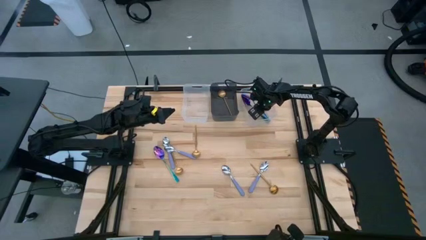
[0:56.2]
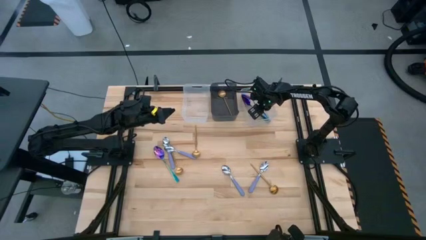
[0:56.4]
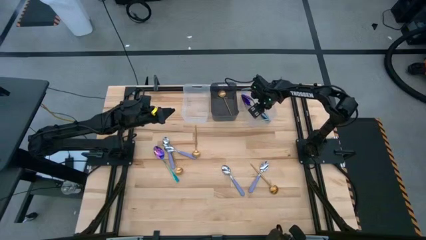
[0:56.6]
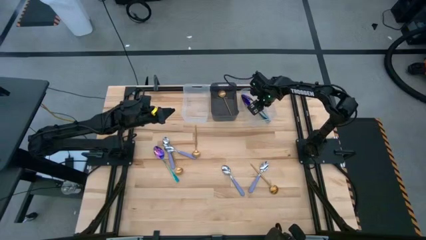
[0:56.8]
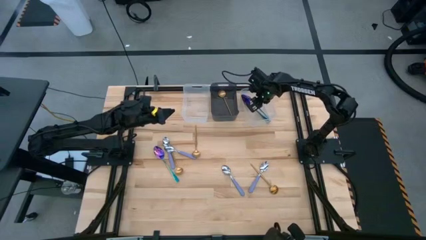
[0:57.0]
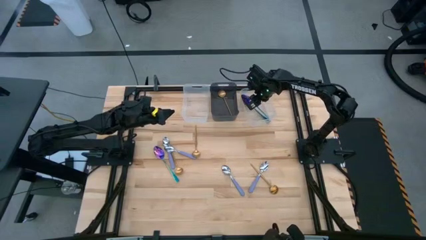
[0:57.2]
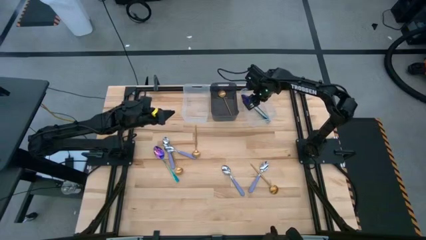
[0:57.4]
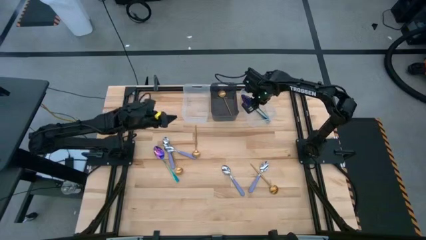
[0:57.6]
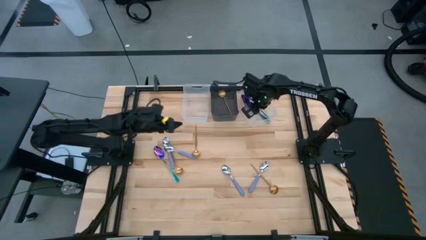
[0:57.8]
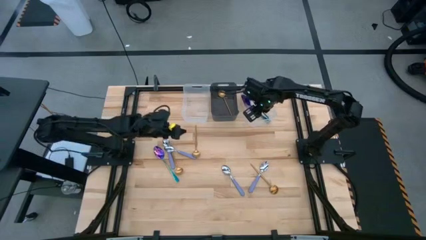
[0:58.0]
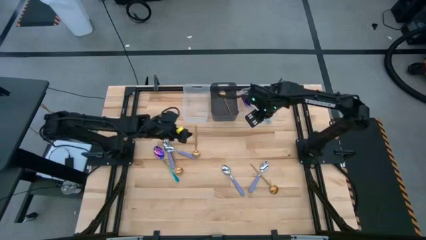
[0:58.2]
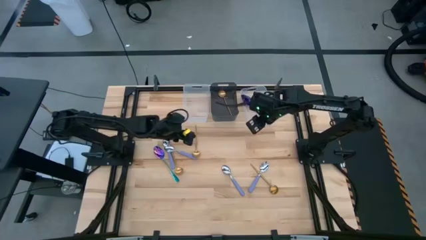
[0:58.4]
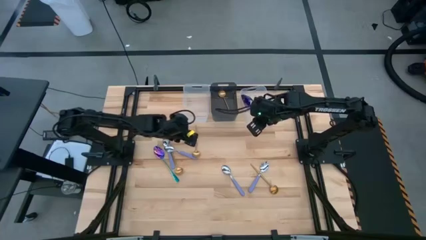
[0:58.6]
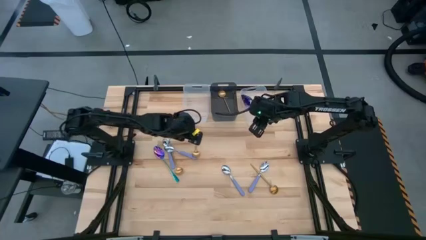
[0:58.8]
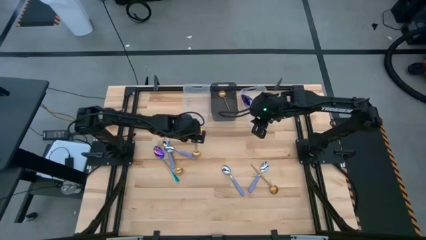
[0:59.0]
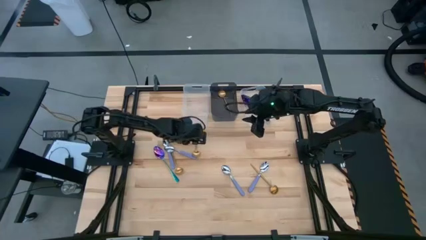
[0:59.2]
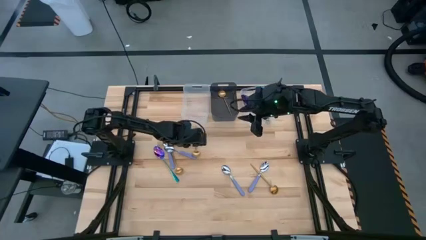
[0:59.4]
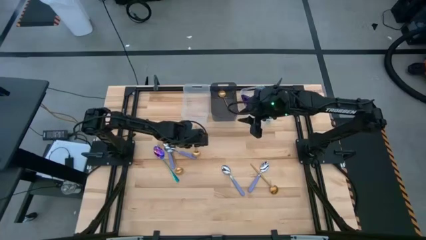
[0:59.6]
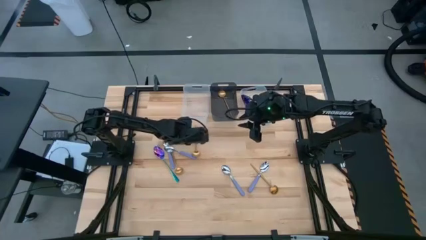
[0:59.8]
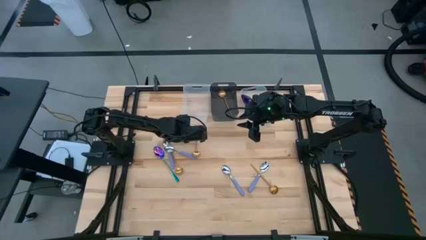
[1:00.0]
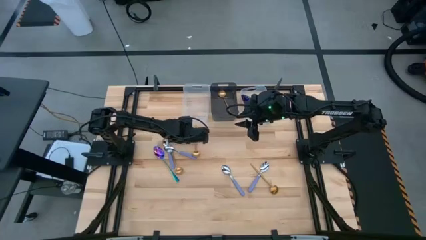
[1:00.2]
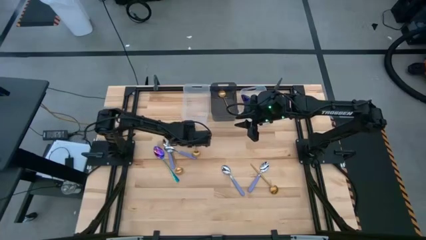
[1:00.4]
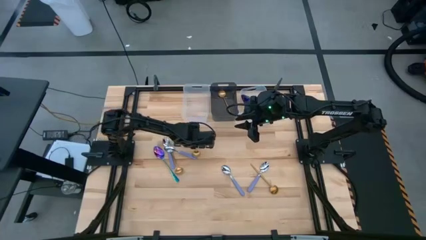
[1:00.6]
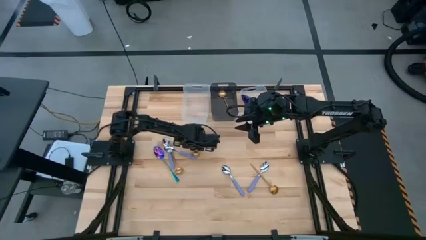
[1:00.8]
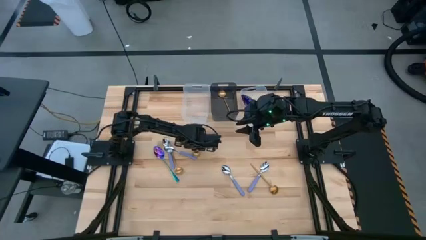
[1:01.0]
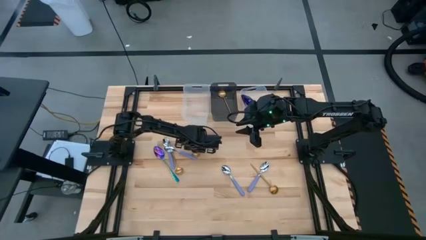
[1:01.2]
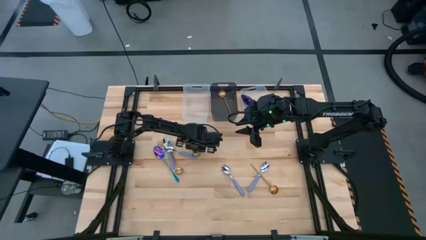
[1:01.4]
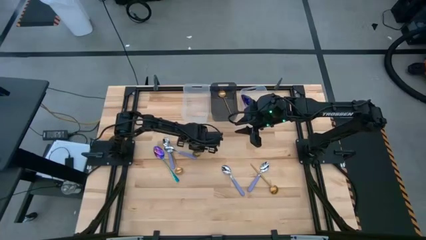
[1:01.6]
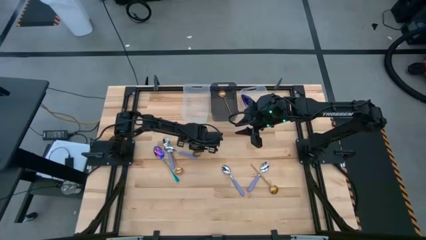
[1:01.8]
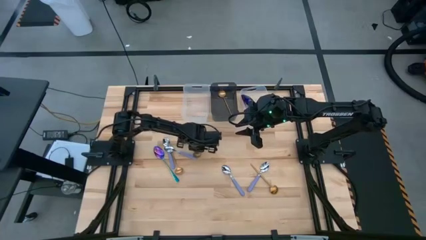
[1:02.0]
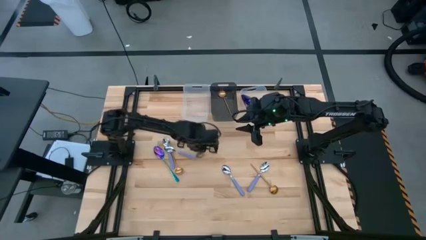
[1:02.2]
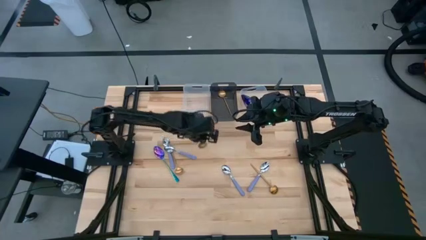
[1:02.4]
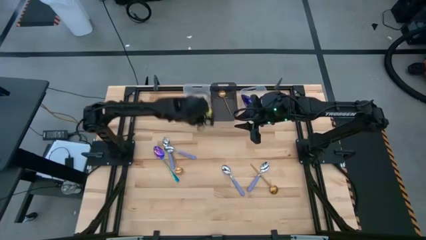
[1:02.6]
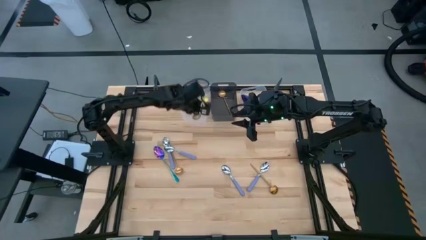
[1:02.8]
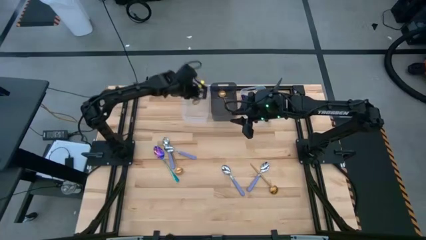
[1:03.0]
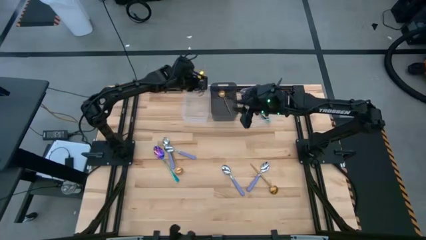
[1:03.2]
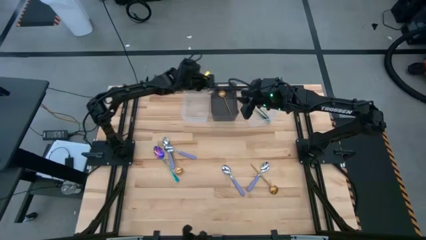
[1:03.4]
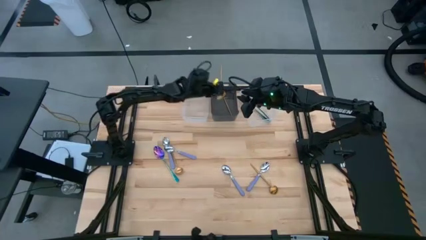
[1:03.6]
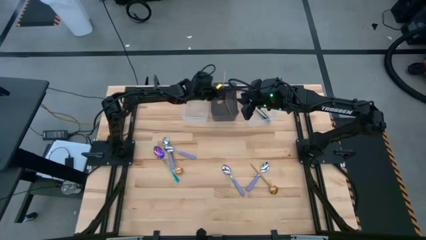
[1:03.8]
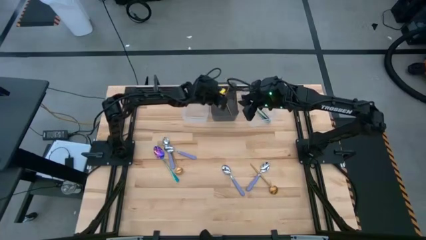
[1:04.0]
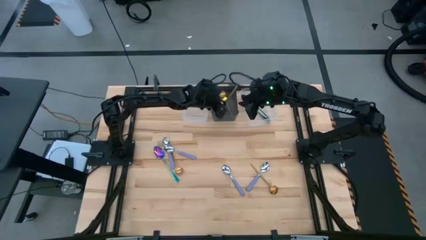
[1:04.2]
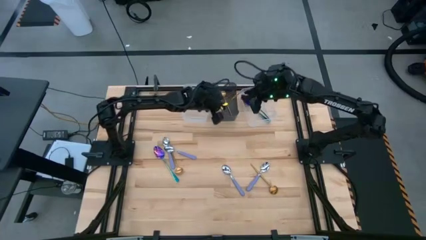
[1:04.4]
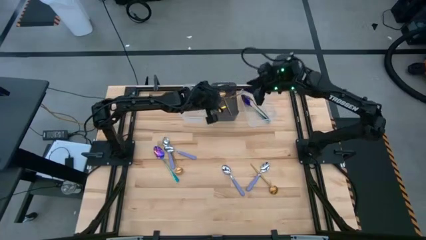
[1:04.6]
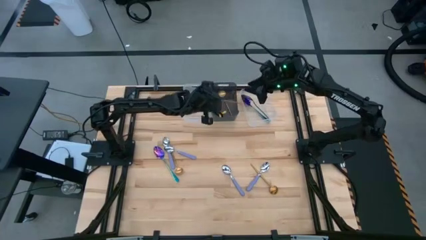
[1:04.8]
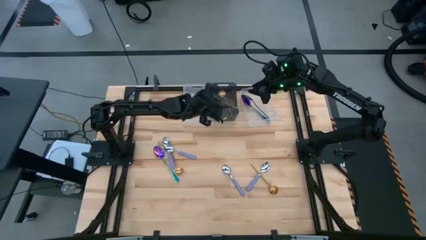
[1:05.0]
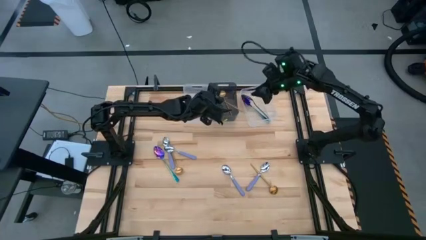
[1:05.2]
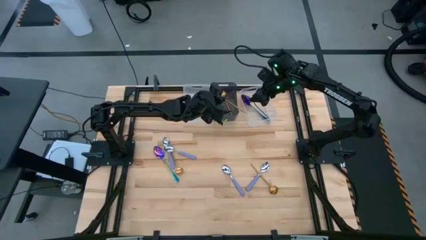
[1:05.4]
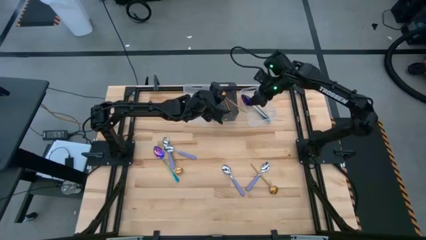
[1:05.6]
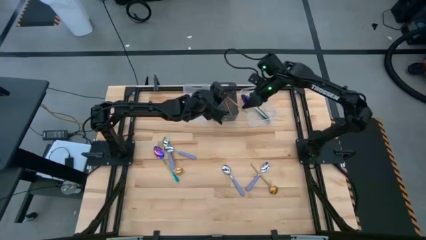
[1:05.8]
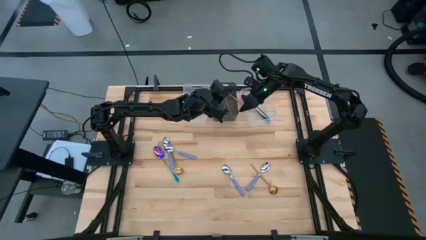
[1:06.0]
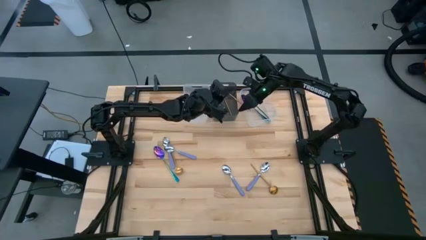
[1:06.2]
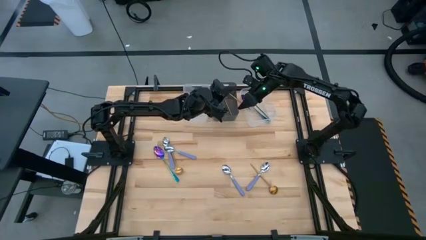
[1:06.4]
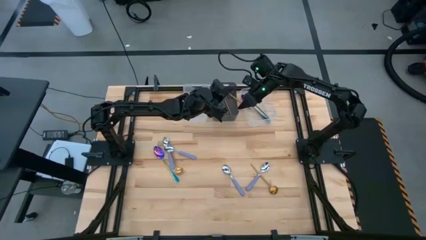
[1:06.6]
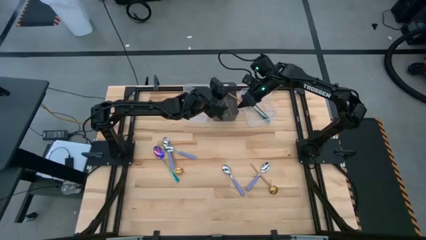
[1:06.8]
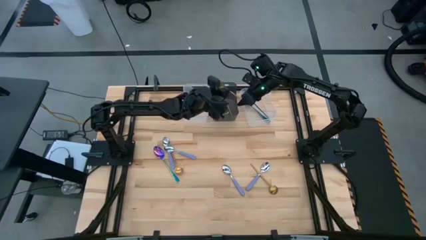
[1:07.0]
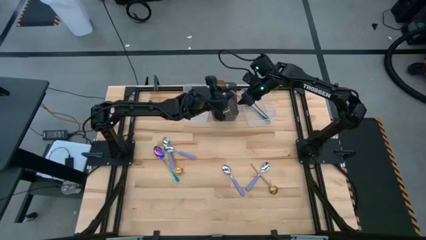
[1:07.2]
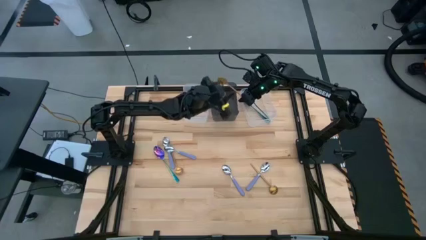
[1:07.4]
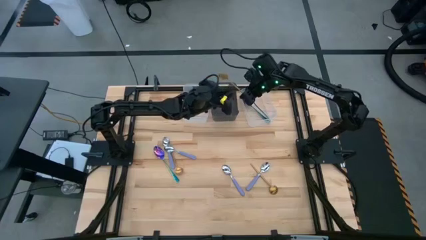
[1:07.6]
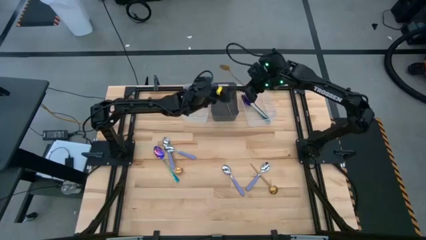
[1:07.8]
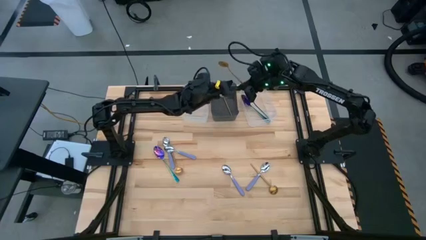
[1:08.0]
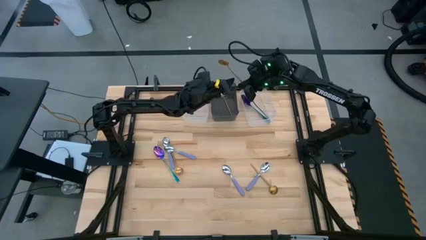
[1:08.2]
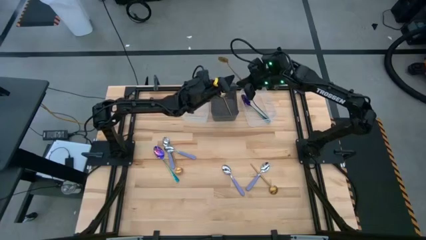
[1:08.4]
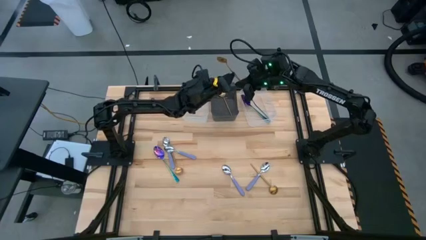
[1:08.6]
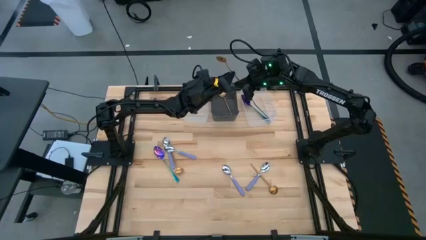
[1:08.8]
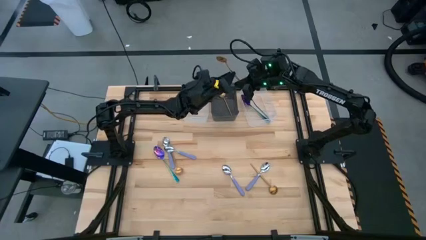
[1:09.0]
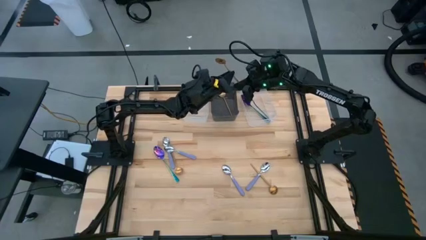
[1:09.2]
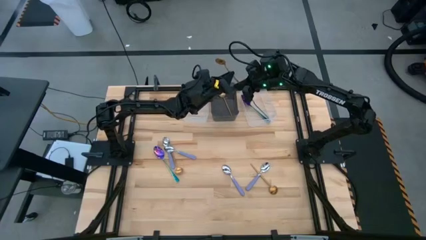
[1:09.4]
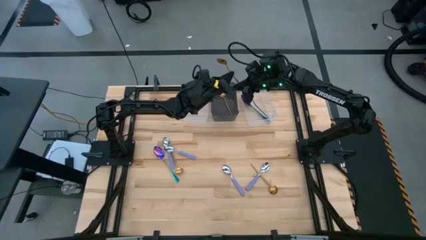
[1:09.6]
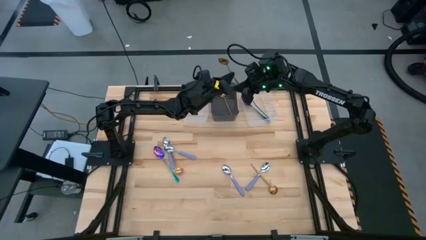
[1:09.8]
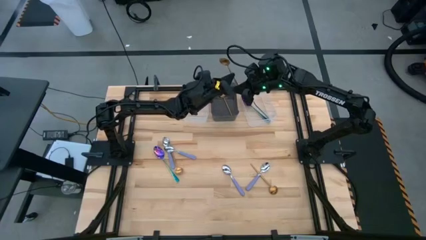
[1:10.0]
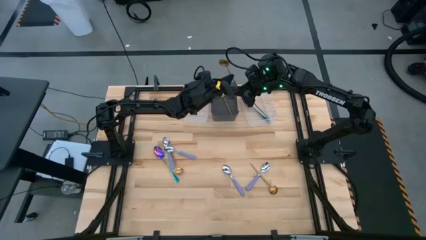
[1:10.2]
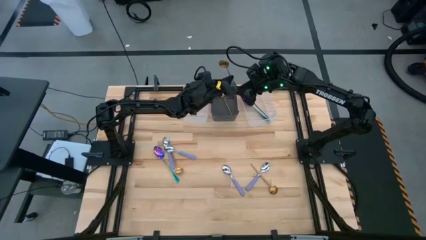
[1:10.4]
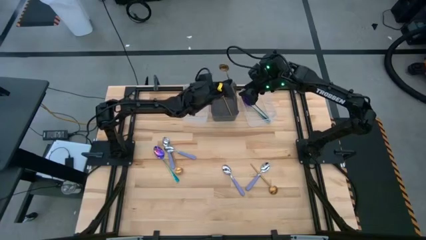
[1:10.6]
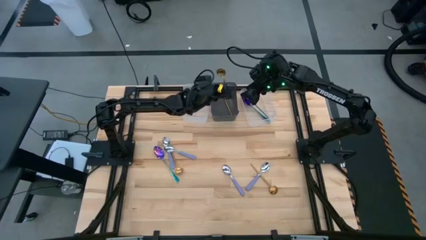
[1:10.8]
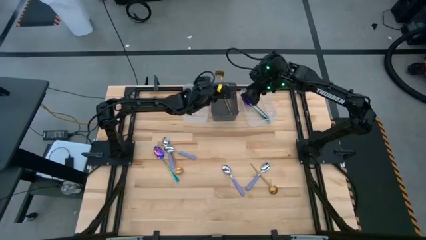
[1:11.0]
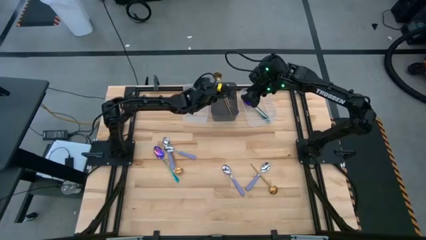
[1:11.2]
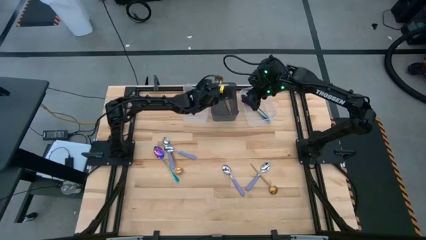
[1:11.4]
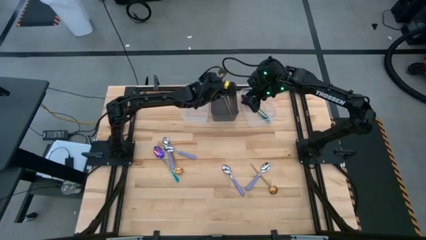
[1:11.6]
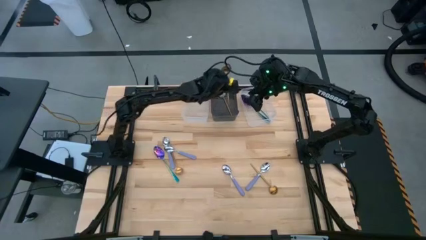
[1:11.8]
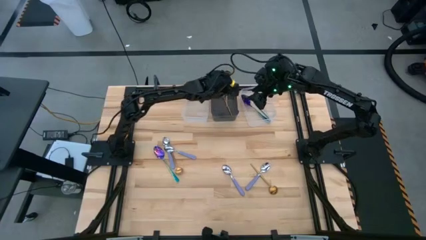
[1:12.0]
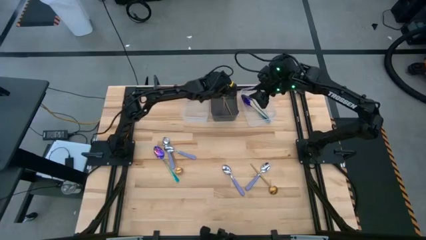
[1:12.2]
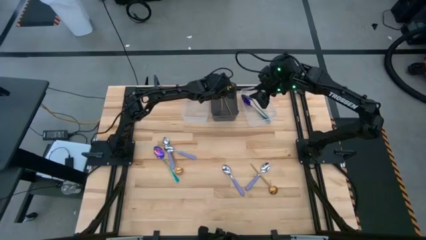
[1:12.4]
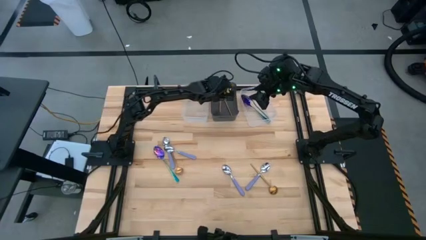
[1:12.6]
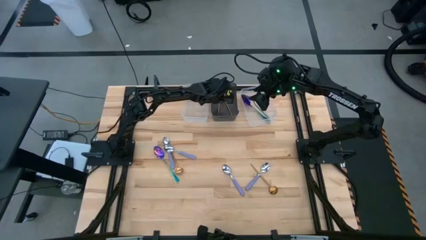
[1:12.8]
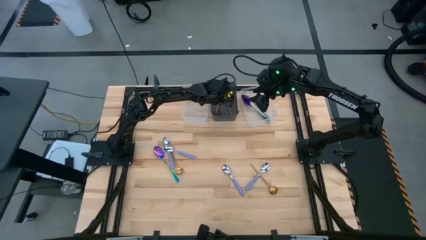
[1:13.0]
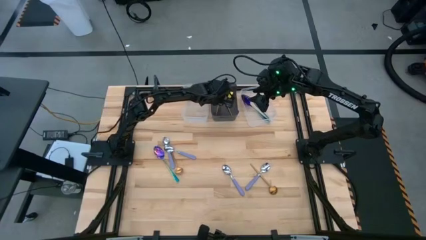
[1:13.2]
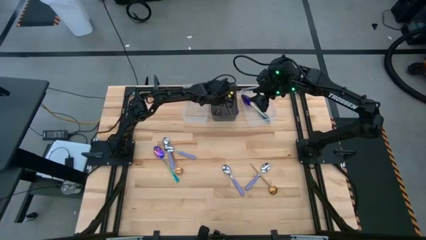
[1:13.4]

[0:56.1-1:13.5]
Task: Sort silverware by color (type)
Put the gold spoon into the black bin
